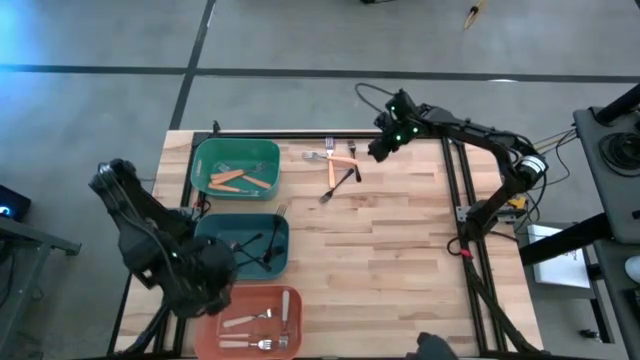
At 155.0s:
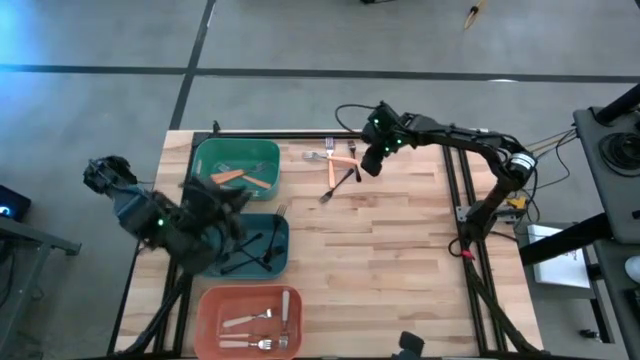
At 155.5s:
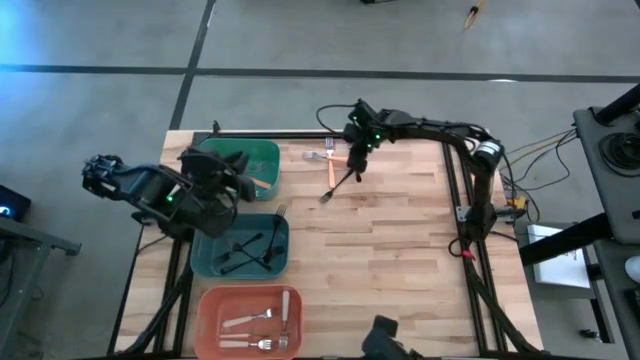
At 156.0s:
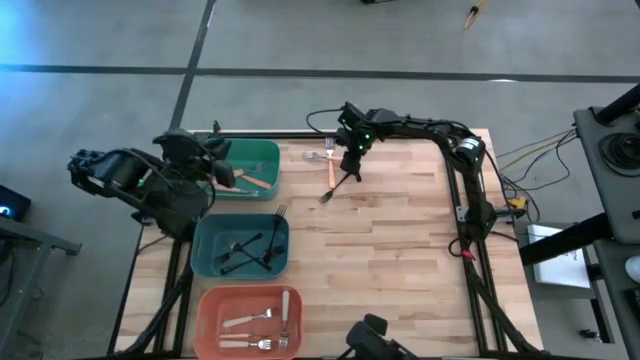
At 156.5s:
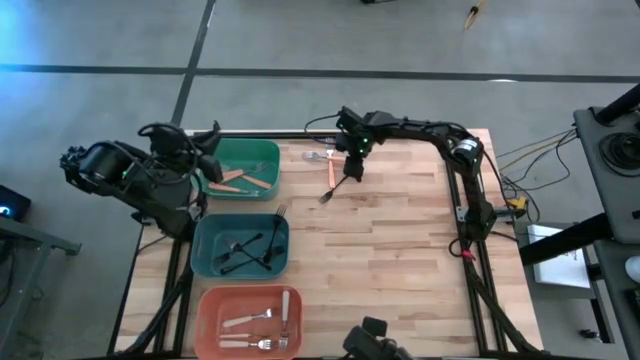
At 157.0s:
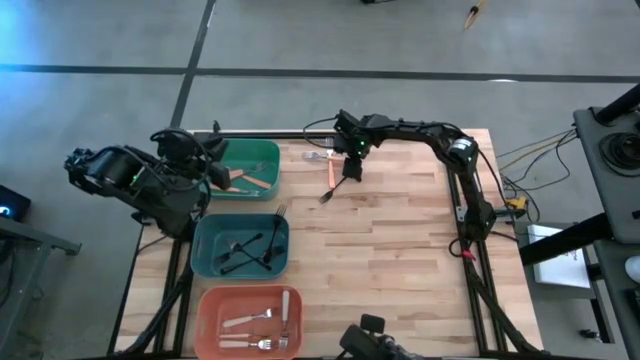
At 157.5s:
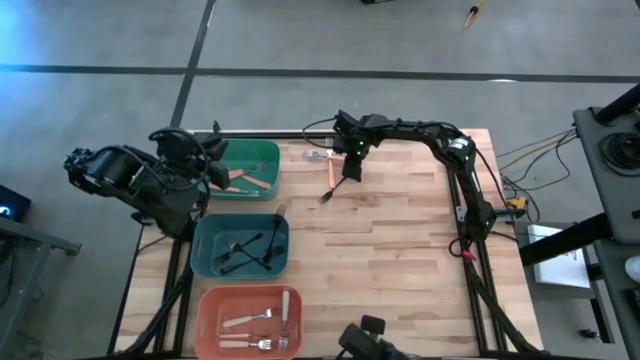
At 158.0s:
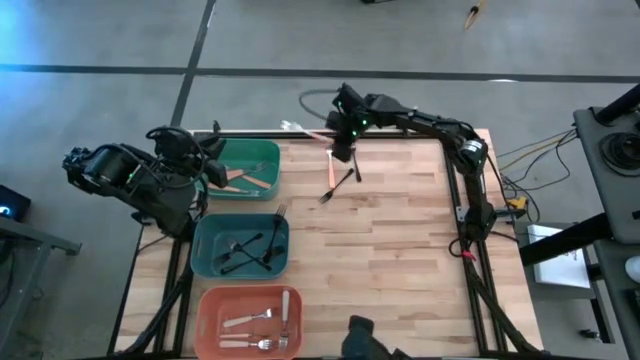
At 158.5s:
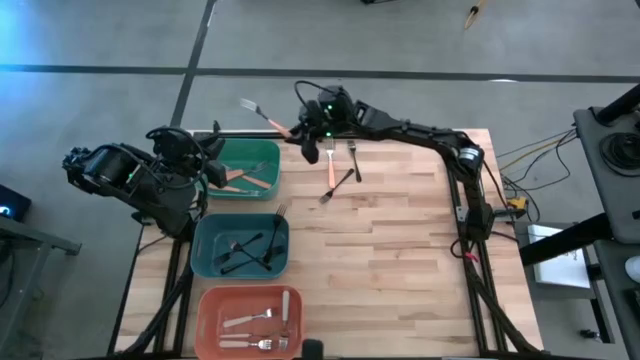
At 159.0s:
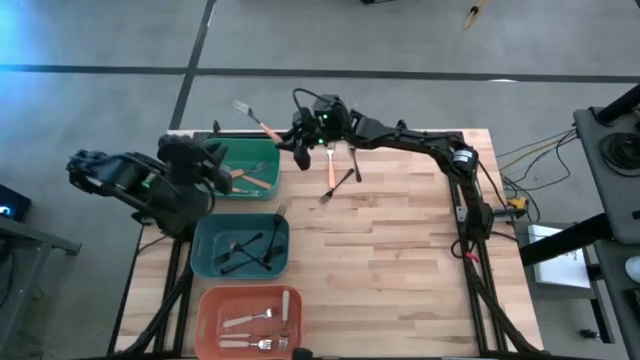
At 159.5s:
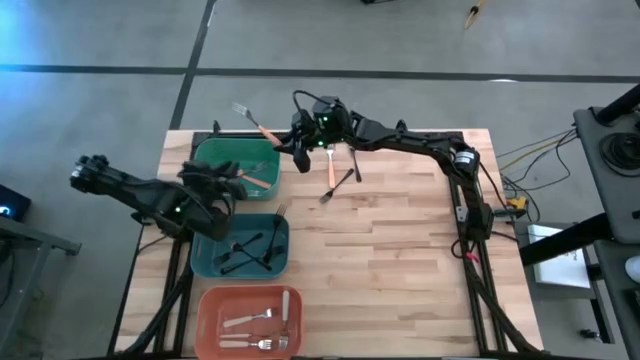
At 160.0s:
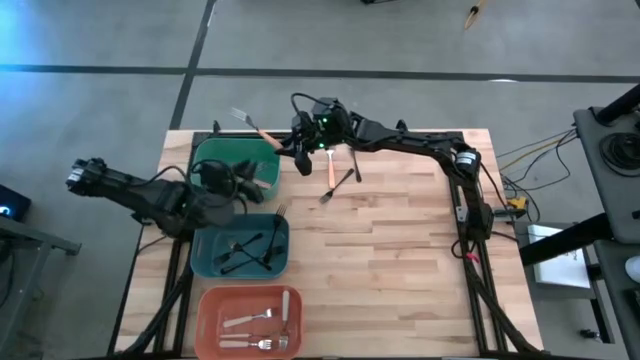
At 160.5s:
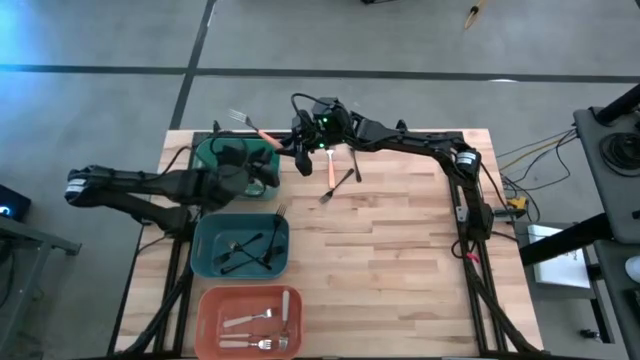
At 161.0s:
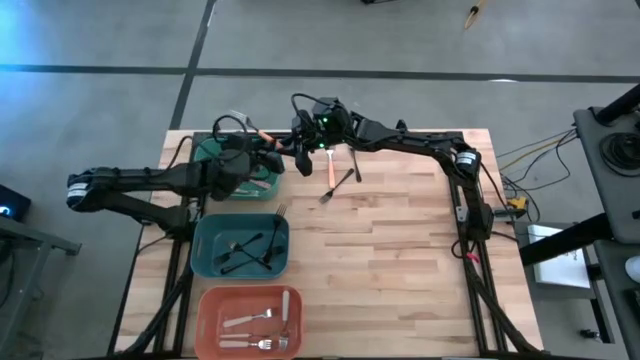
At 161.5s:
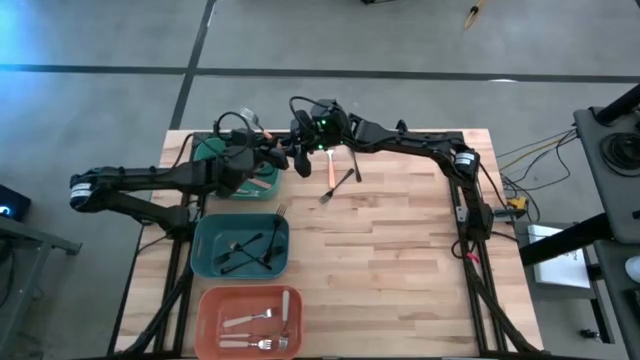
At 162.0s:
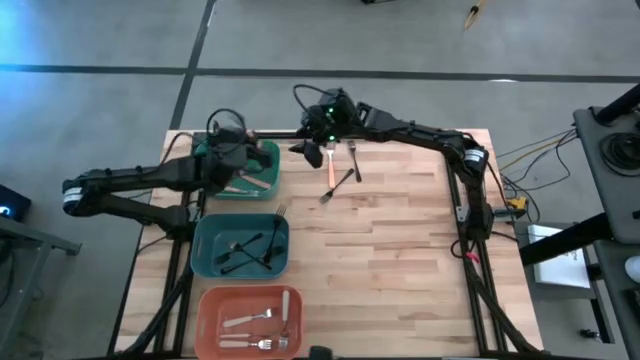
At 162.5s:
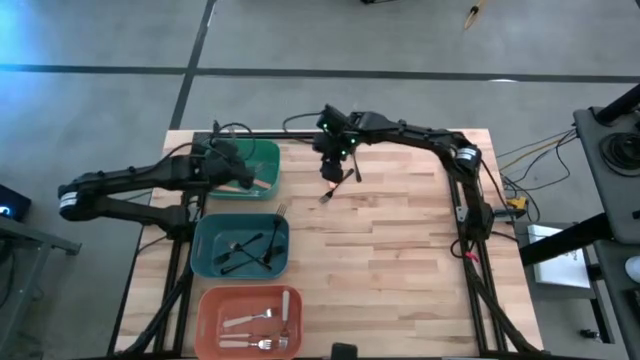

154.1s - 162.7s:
Task: Sort silverware by color (type)
Put the orange fork into the green bin

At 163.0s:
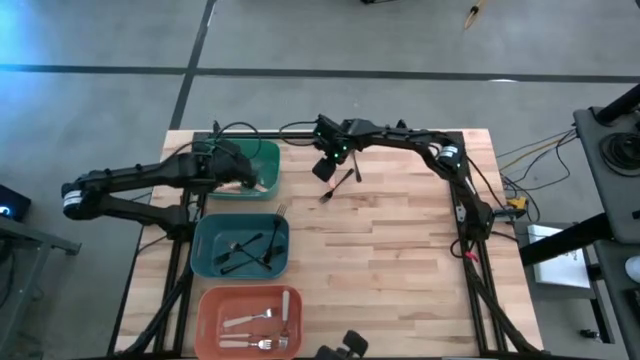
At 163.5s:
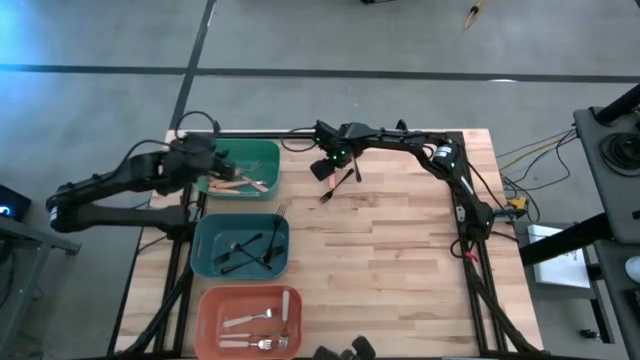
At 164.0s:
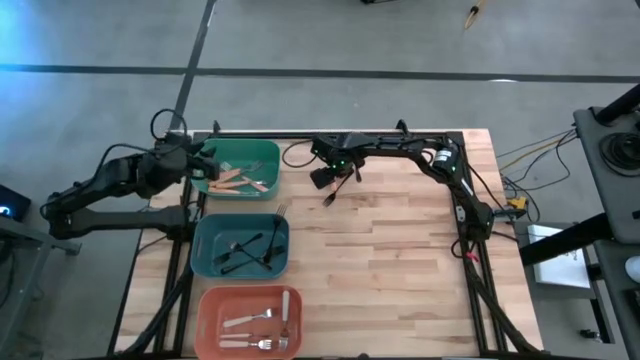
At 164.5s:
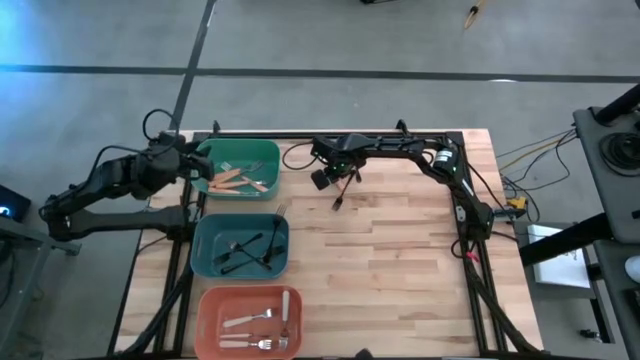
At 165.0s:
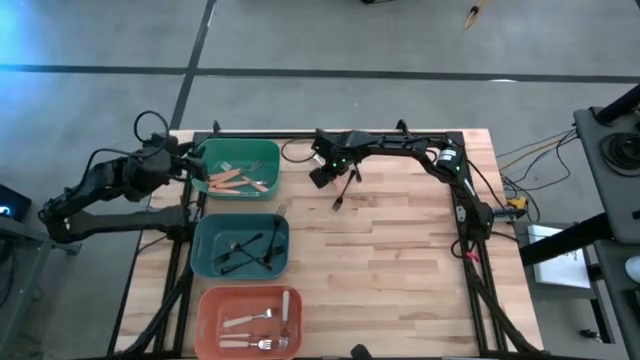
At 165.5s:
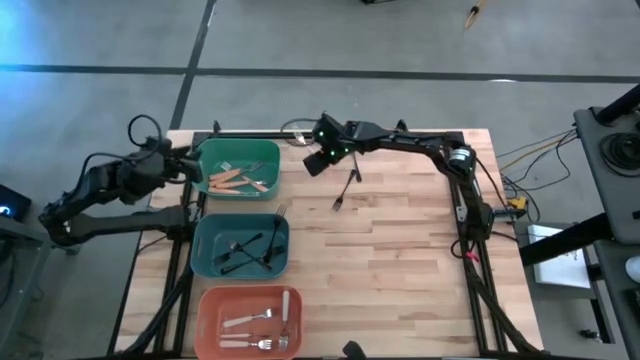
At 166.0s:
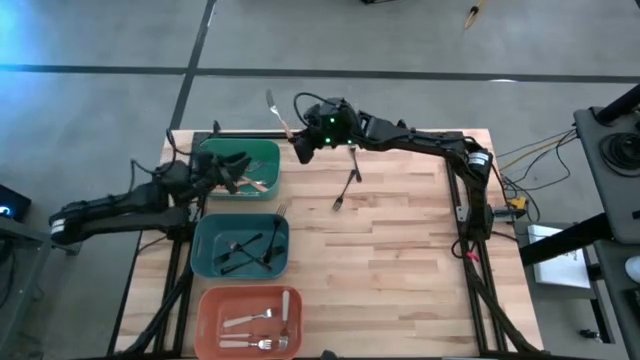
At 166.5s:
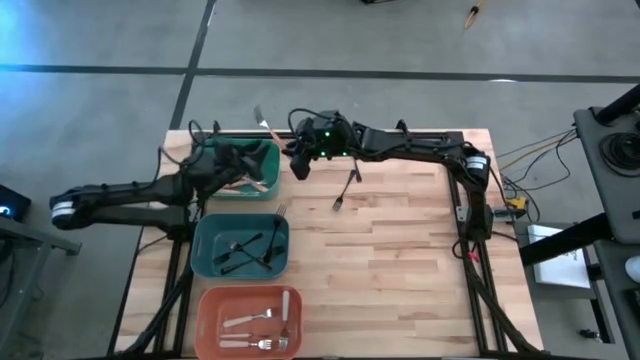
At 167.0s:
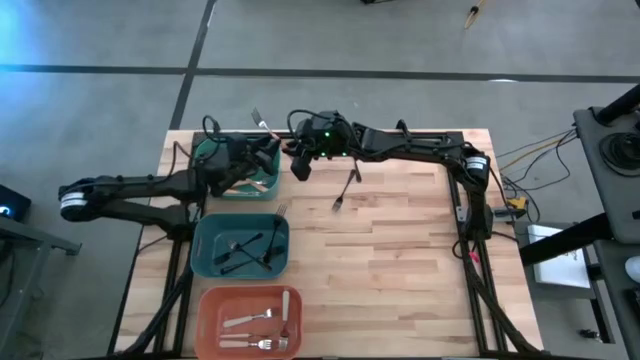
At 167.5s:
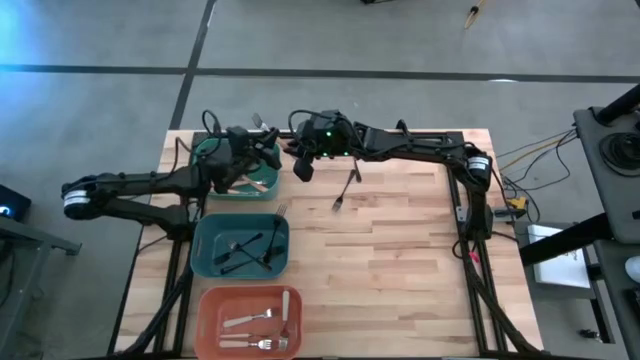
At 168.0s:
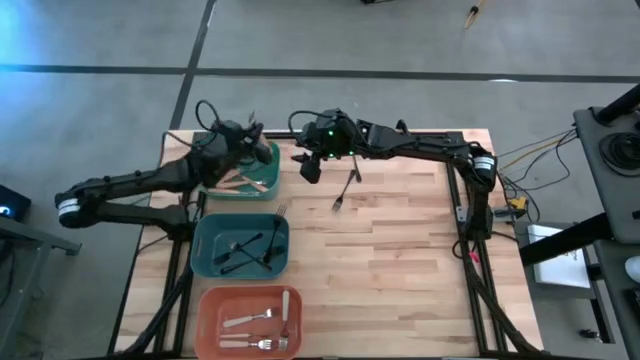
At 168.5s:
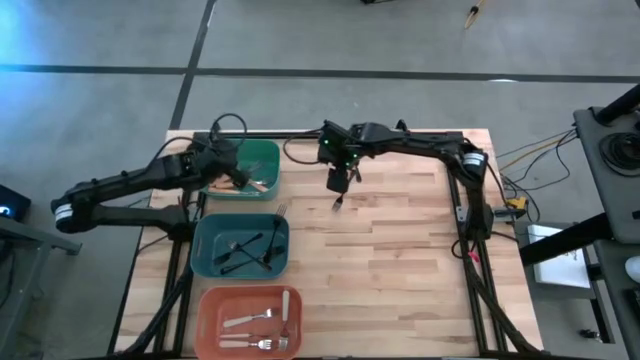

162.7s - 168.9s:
Put the orange fork into the green bin

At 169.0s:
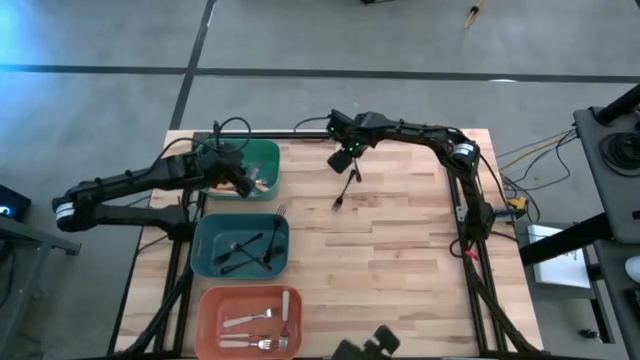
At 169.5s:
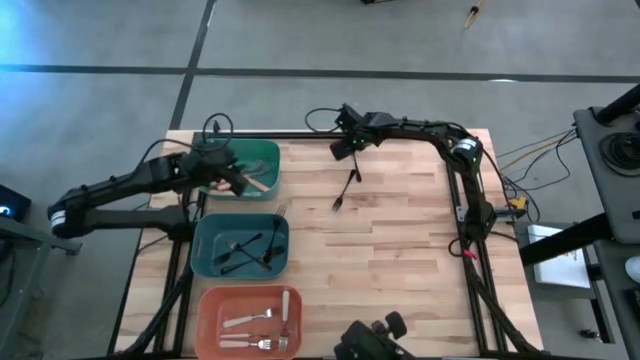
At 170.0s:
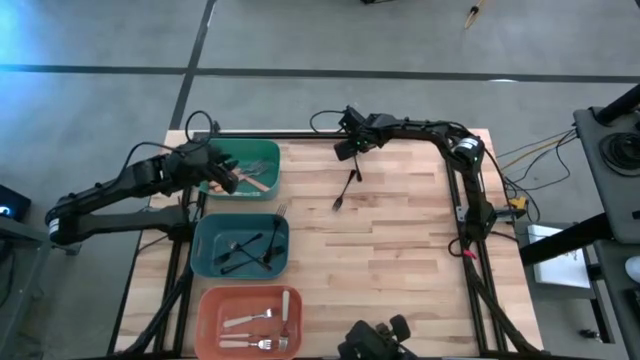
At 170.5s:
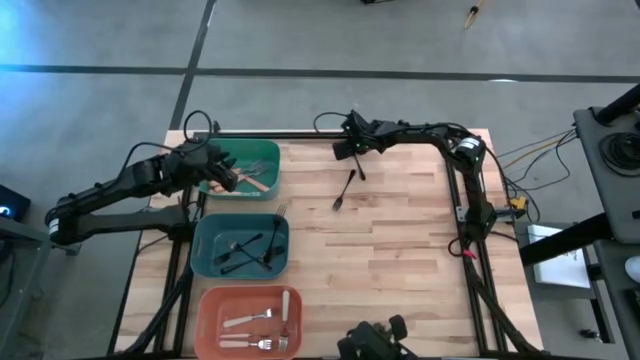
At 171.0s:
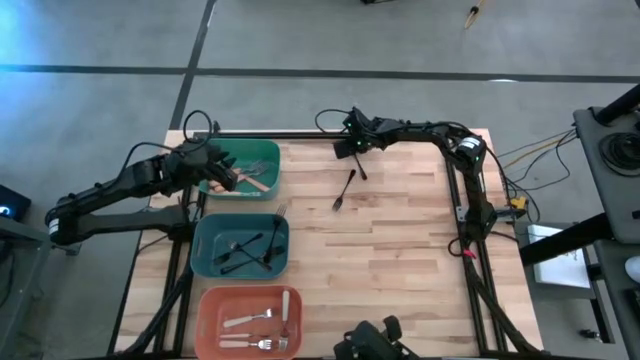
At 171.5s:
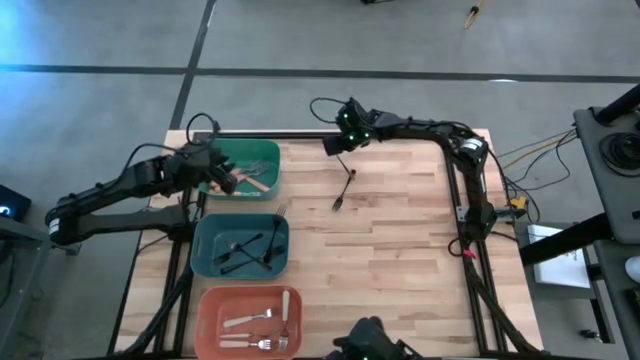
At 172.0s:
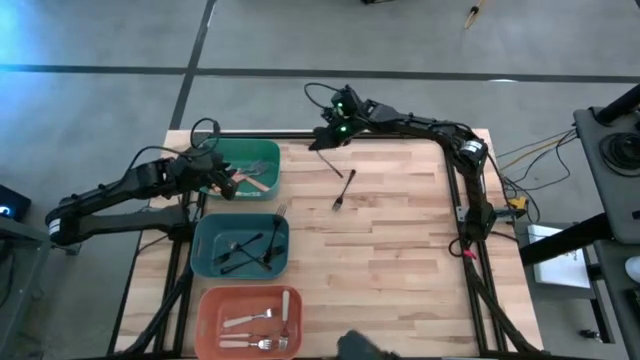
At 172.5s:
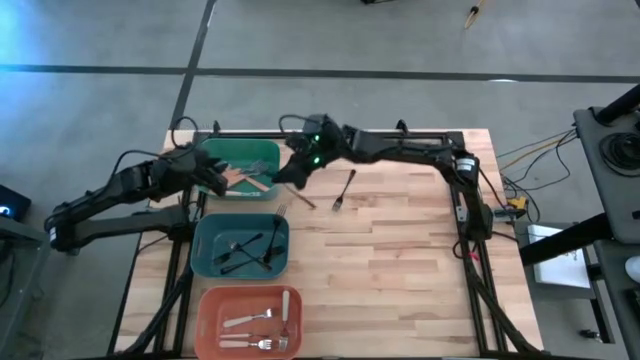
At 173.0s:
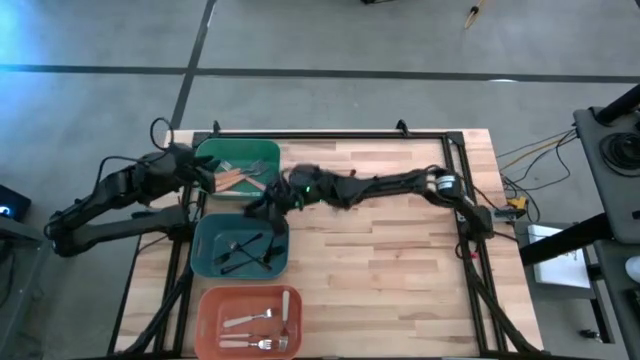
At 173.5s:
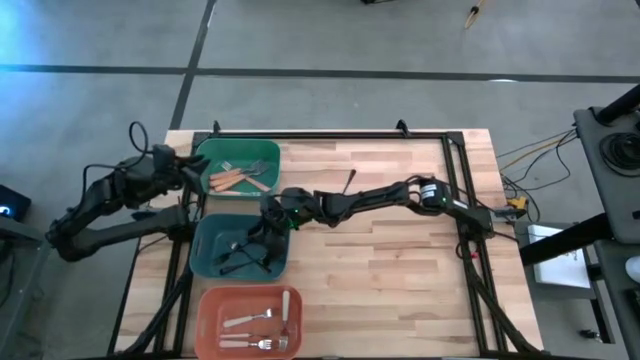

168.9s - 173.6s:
Put the black fork into the blue bin

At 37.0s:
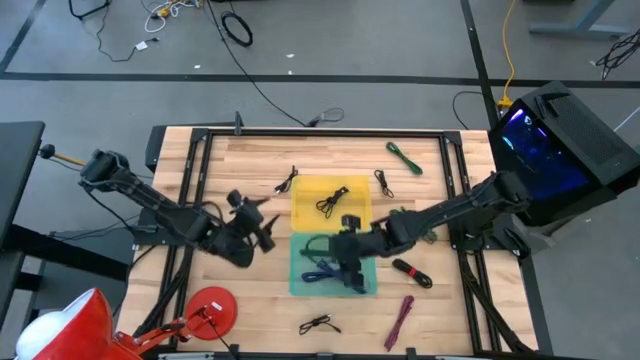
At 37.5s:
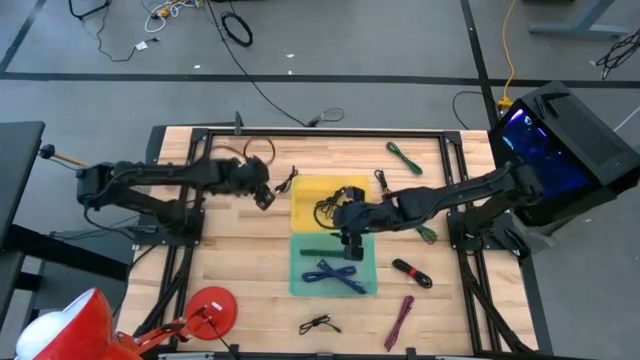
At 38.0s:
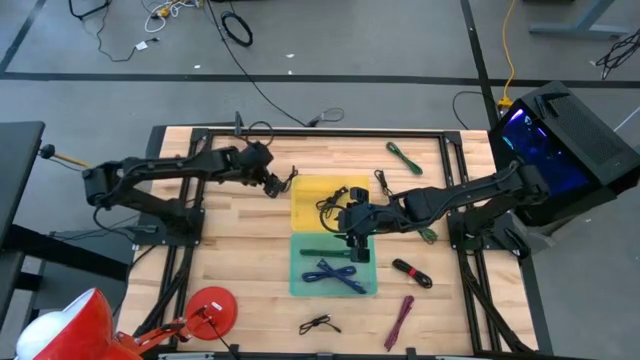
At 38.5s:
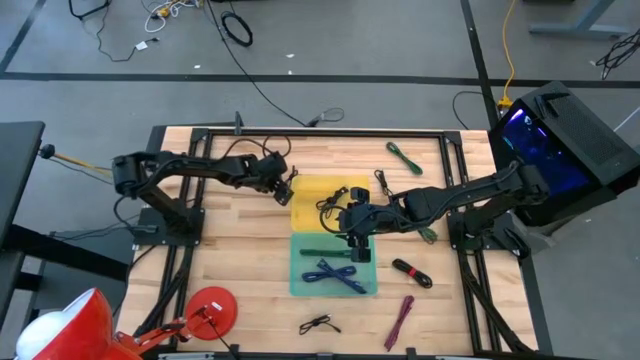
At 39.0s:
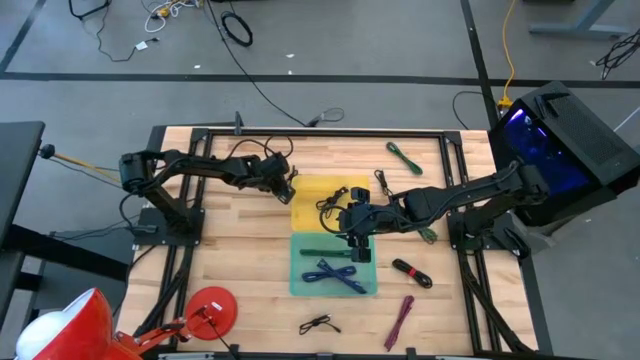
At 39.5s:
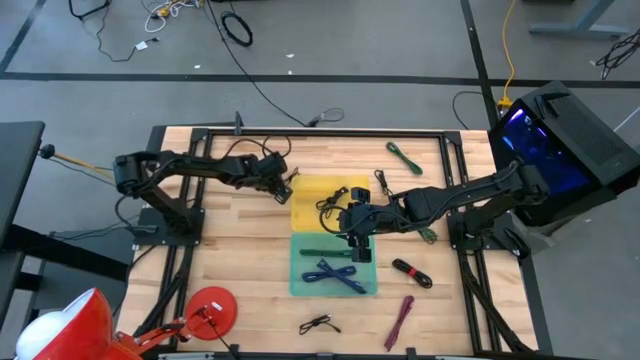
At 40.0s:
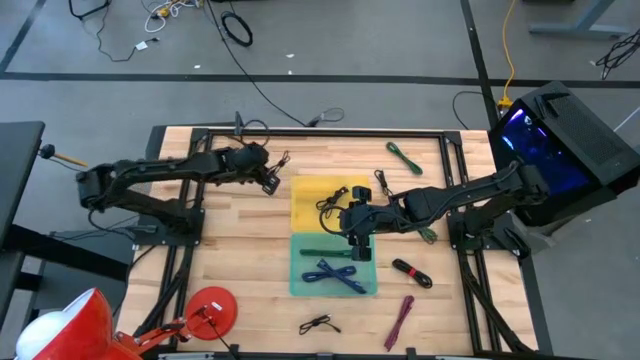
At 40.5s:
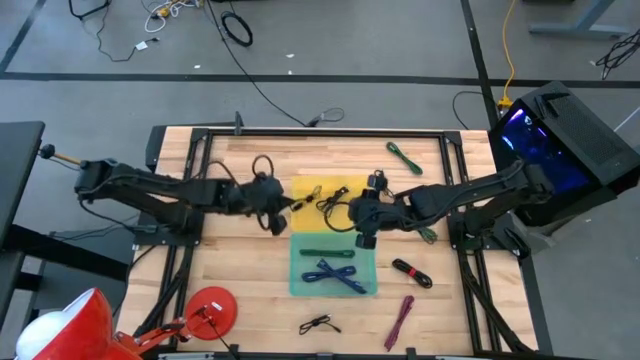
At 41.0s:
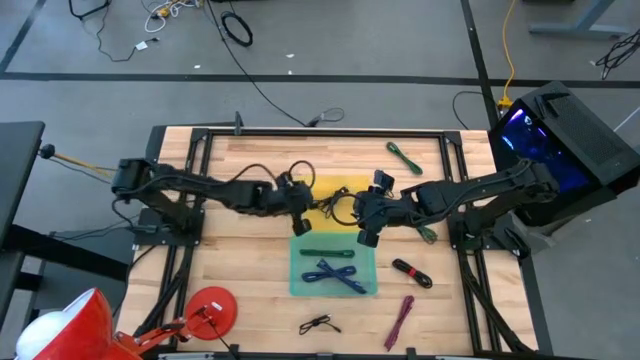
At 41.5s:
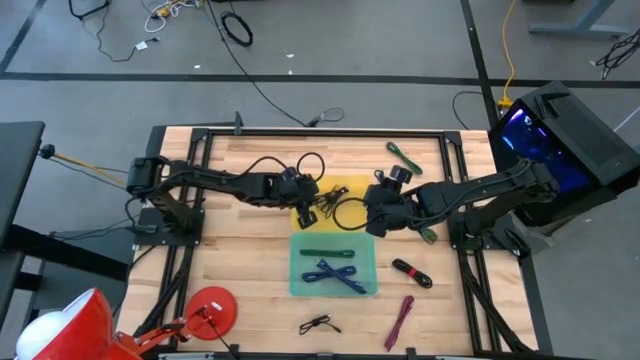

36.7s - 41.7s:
Task: Pick & Place USB Port
Put the black charger cable into the yellow bin
